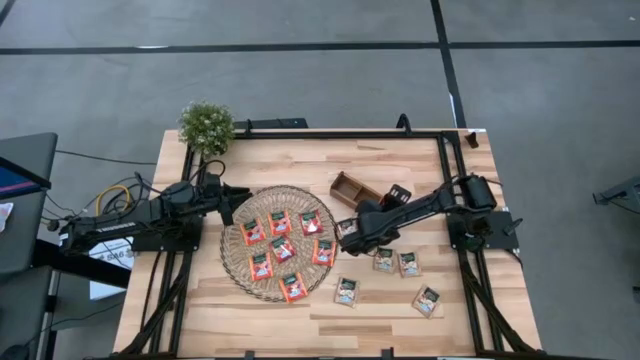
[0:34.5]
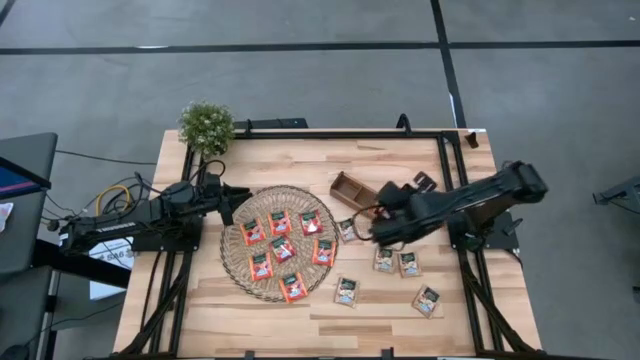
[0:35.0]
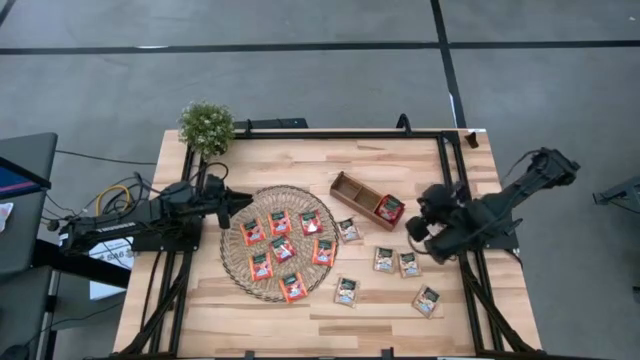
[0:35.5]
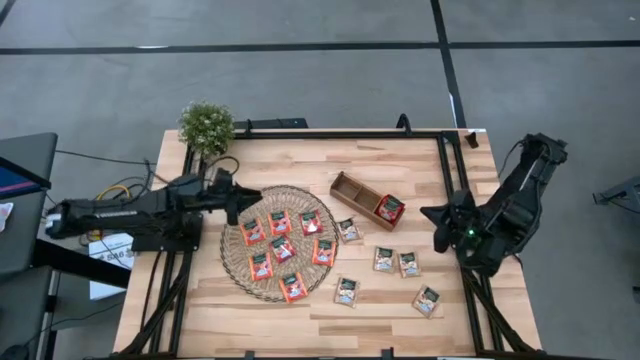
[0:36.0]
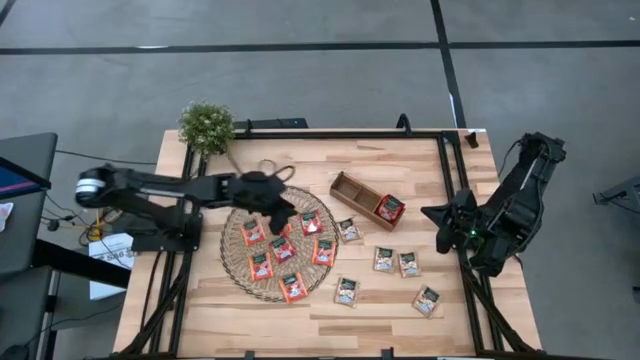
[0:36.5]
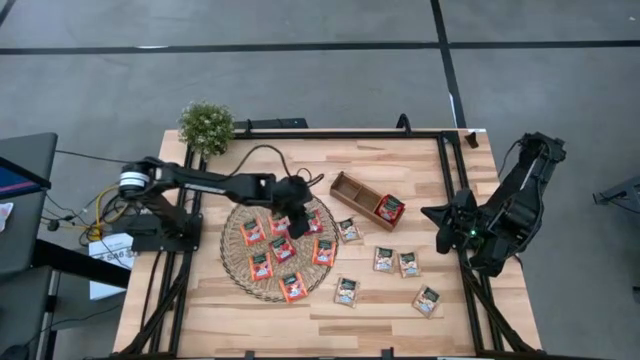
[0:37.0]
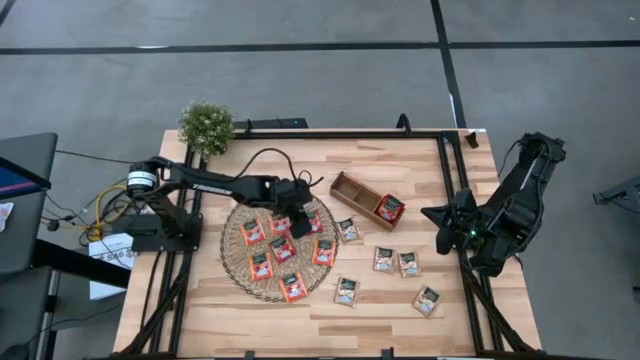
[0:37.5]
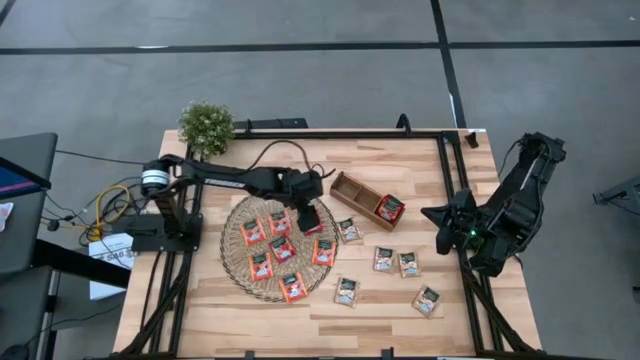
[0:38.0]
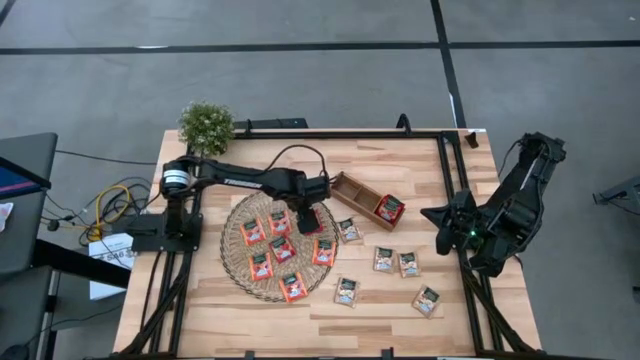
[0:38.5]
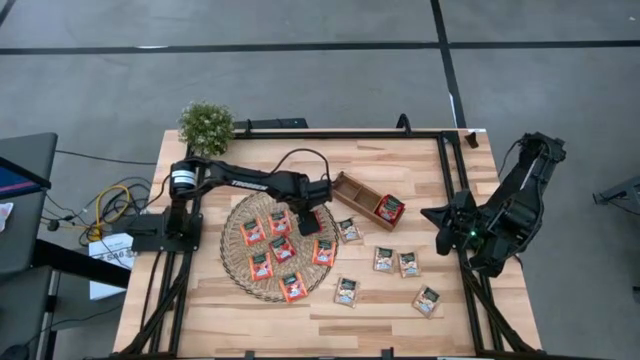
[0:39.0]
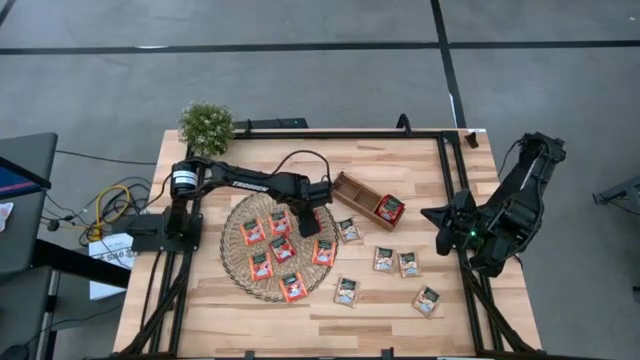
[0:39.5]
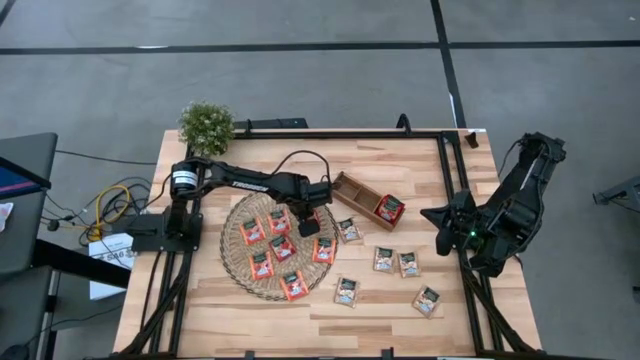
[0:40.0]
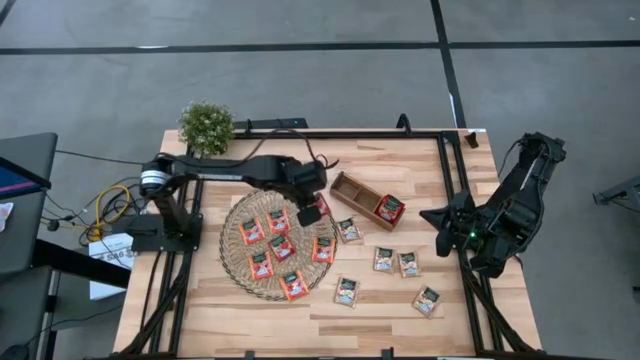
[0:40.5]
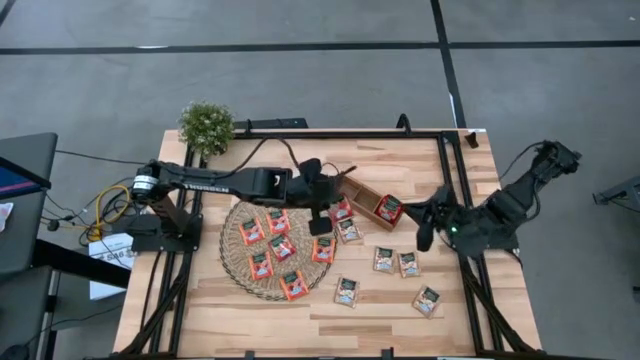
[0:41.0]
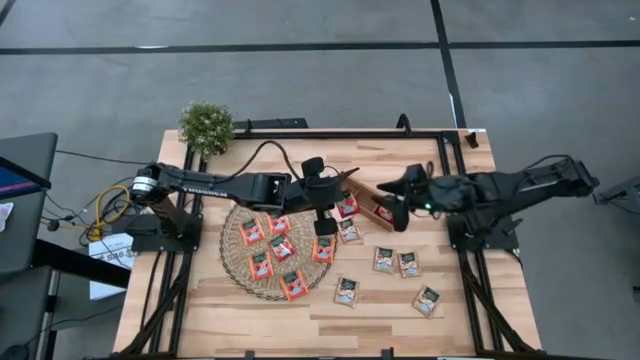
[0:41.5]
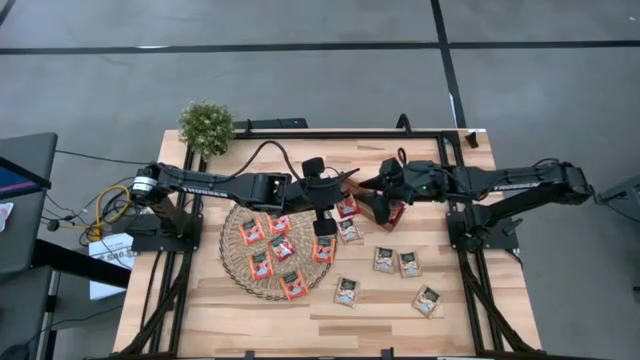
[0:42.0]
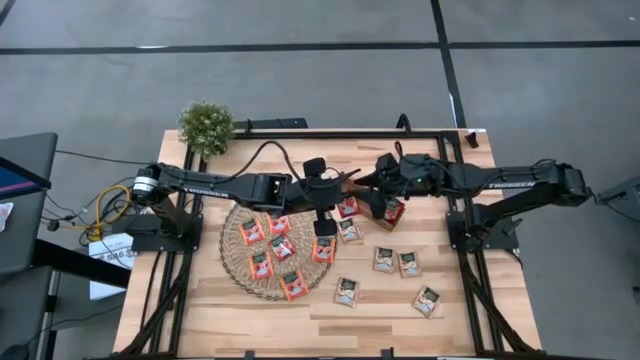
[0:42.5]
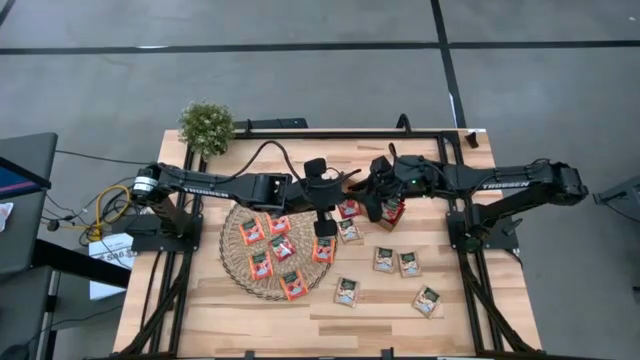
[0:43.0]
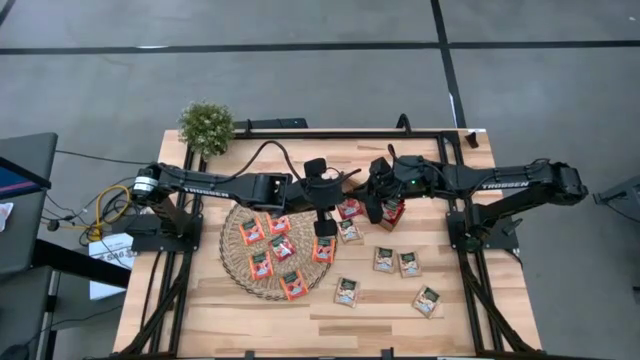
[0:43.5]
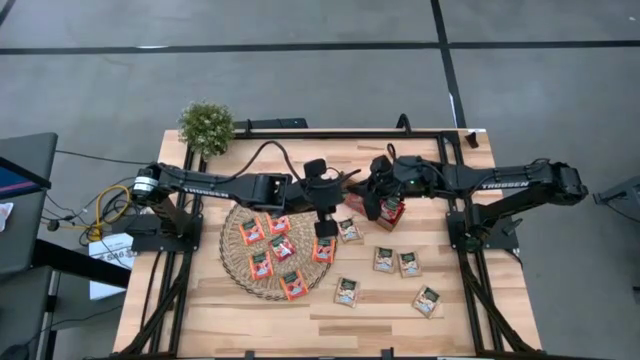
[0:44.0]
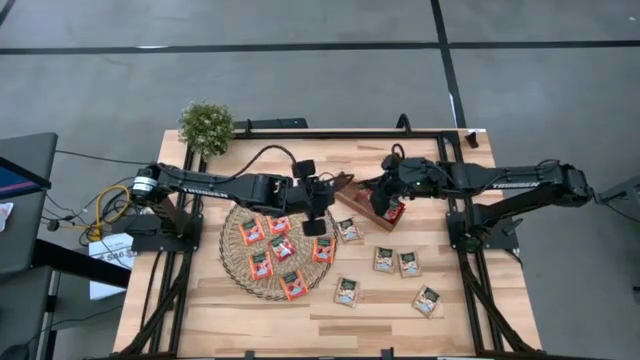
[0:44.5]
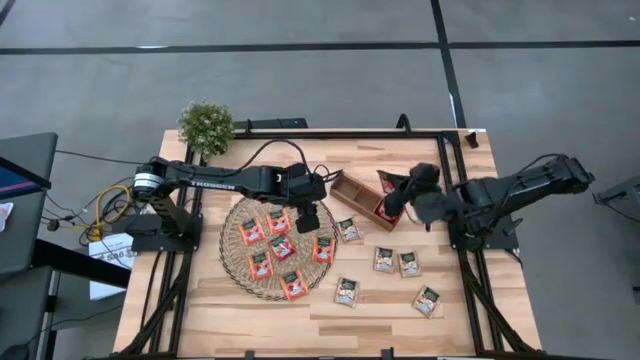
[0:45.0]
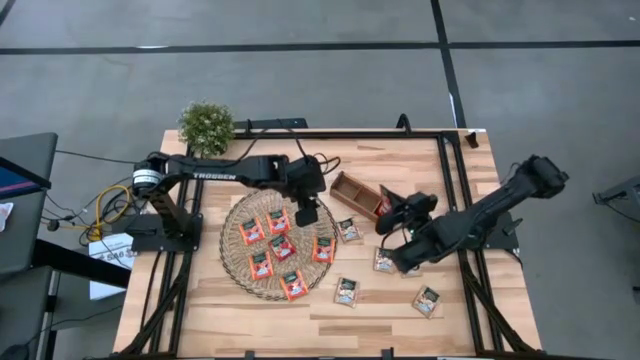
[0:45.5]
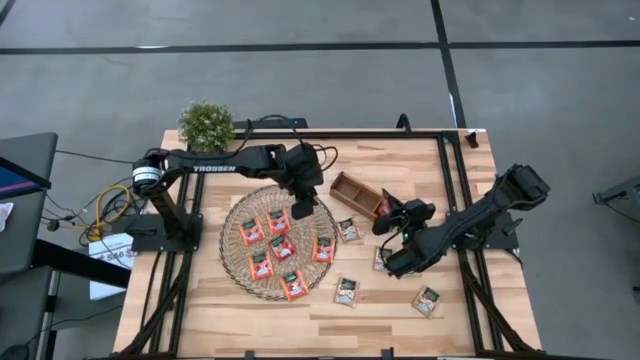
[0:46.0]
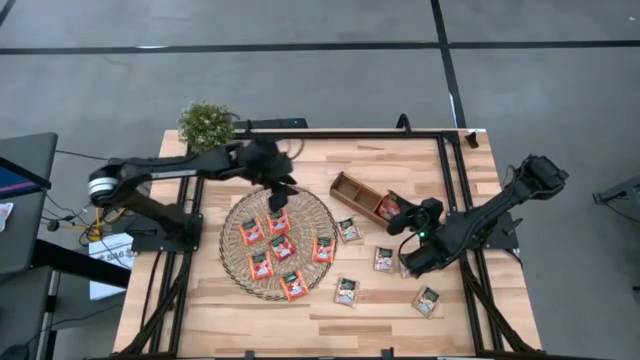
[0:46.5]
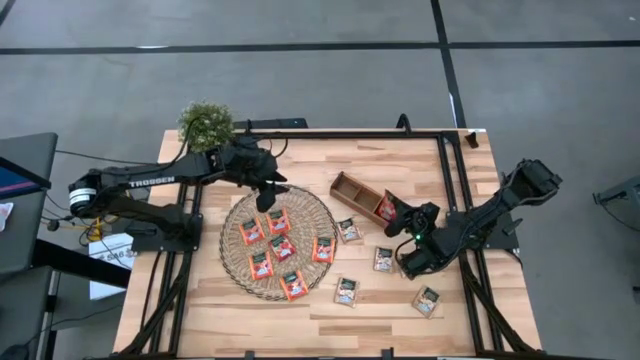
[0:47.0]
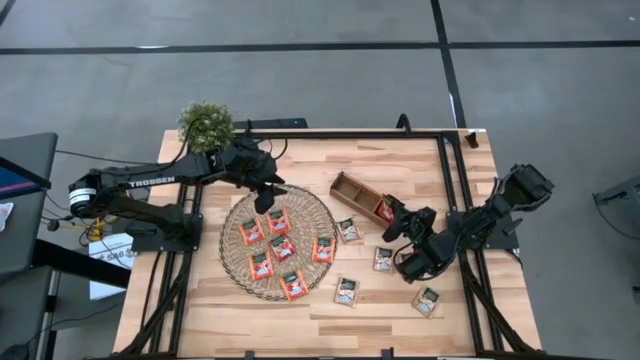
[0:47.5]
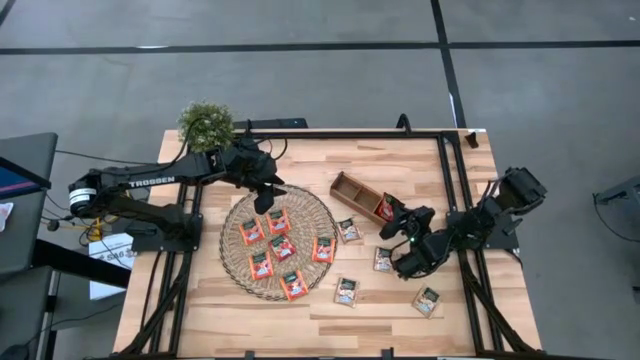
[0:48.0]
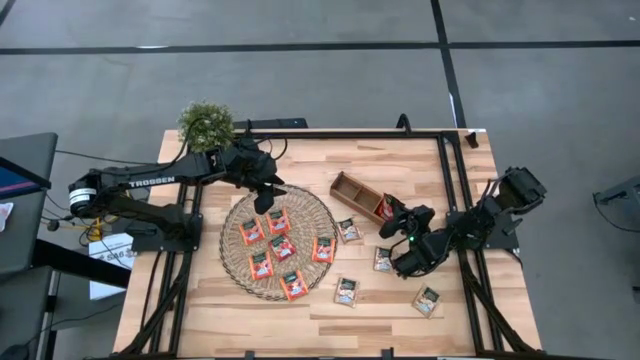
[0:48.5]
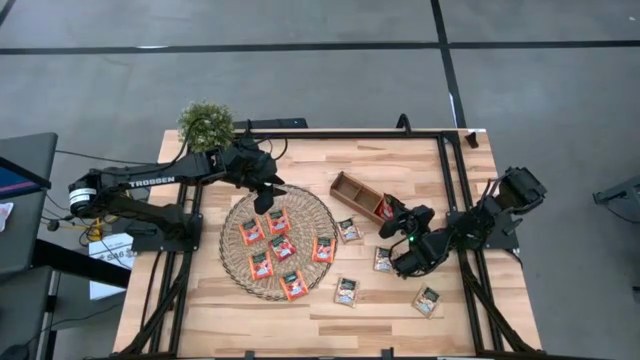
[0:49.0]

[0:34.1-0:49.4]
Task: Pick & Place Tea
Put the red tea bag into the right section of the wooden organizer

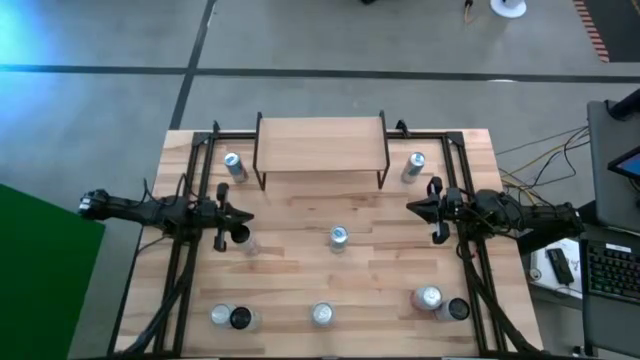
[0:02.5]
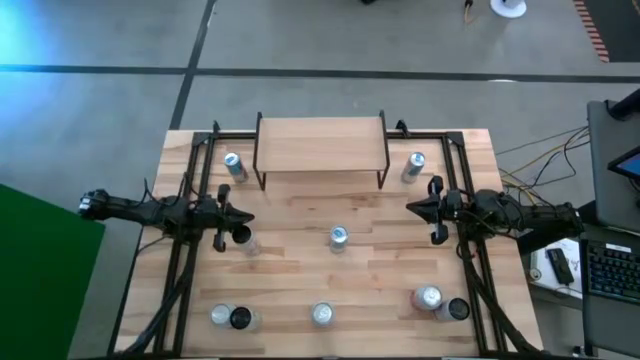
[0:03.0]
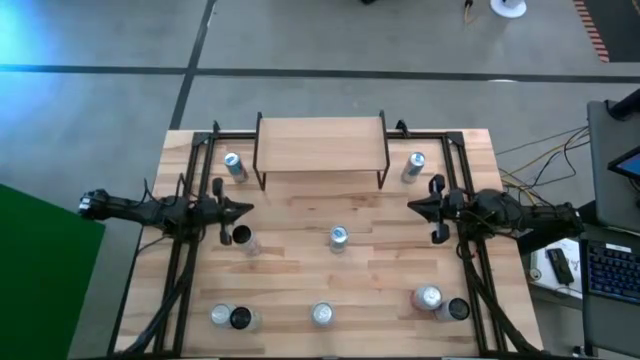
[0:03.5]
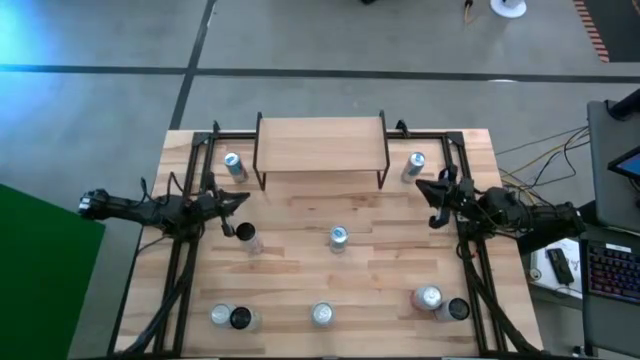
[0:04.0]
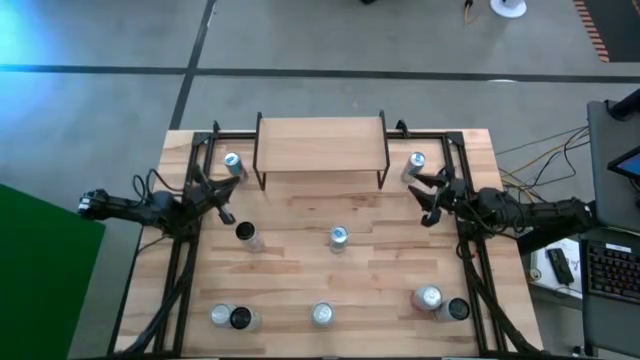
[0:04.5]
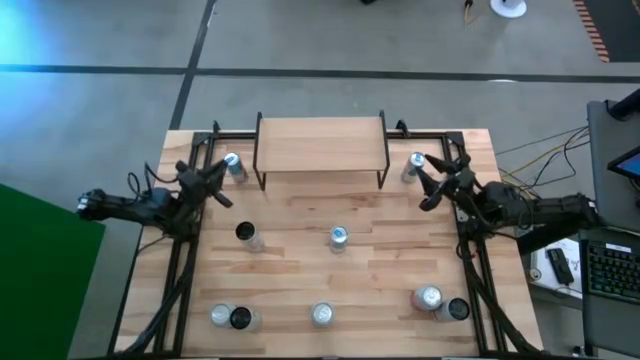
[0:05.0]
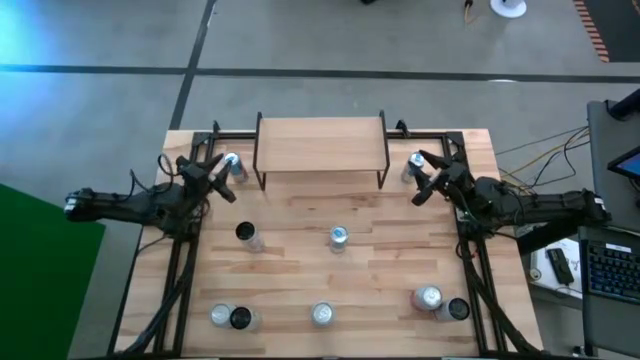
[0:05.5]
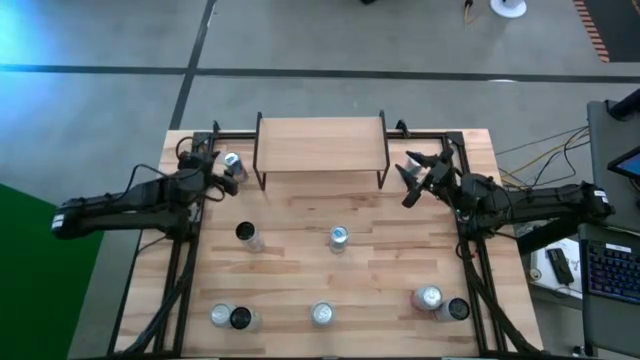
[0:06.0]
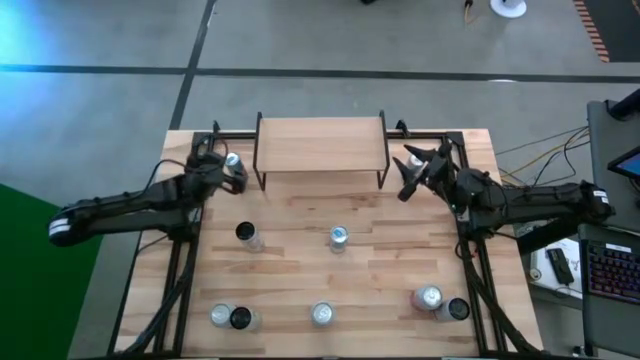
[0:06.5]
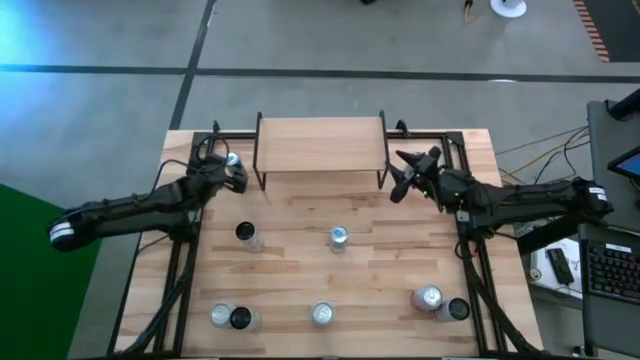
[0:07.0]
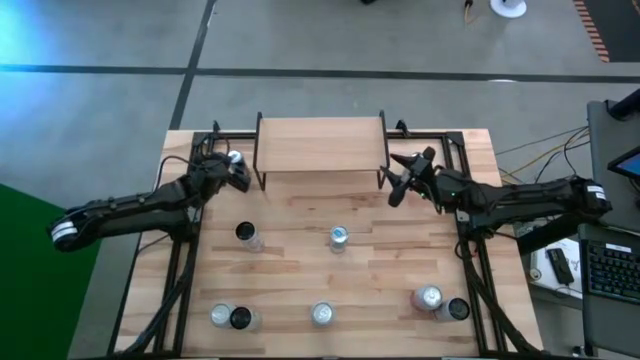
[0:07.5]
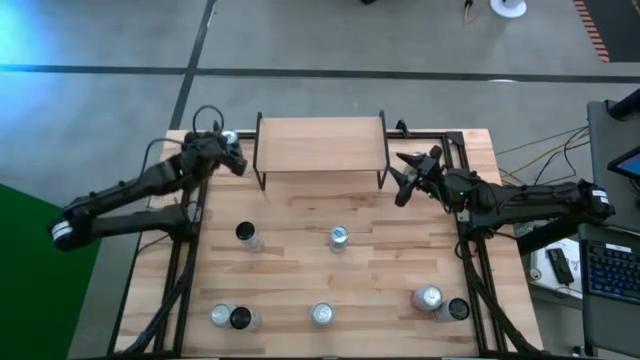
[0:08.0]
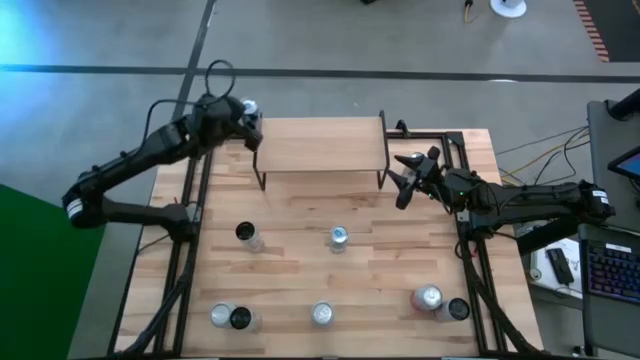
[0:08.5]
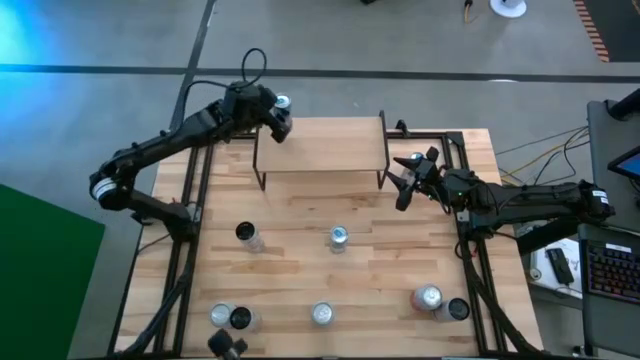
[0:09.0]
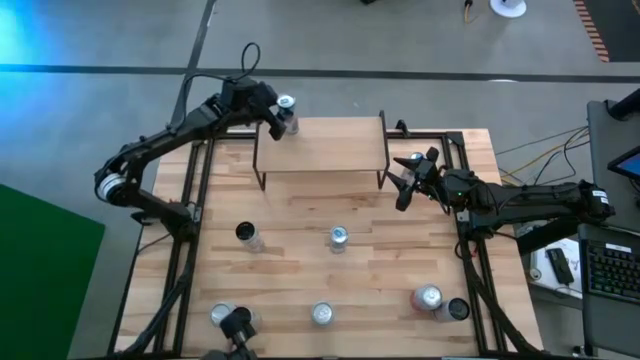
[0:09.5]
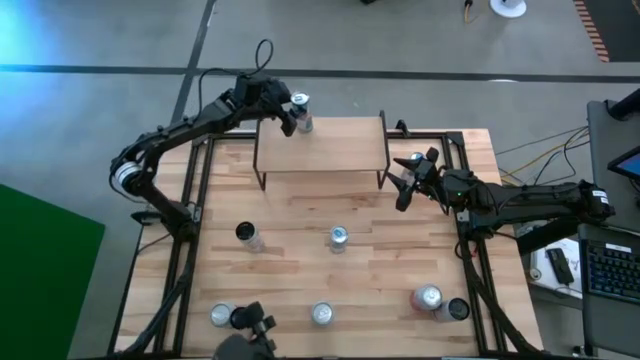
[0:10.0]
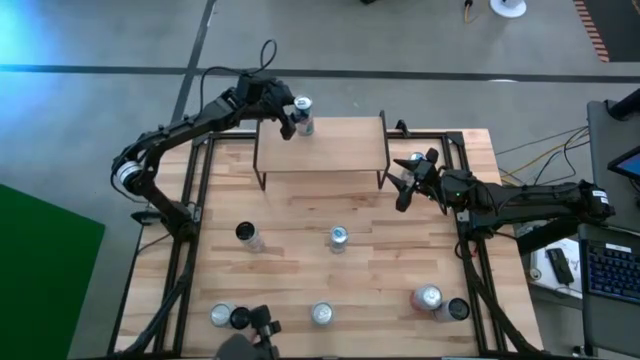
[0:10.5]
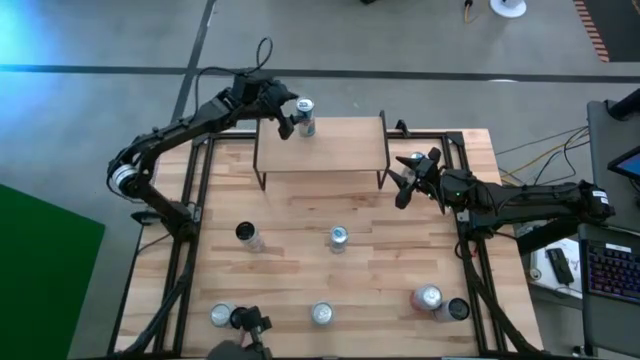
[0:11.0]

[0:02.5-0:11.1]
Task: Place canned beverage on shelf
Put the top left blue soda can on the shelf
